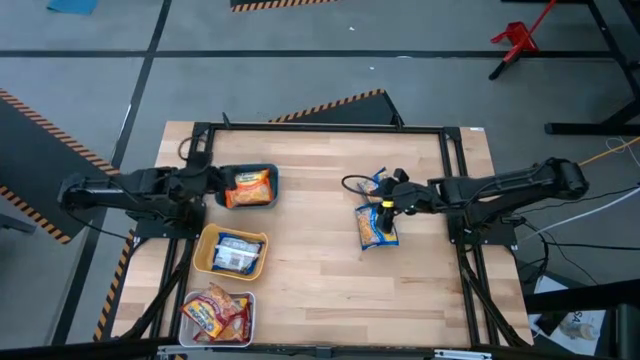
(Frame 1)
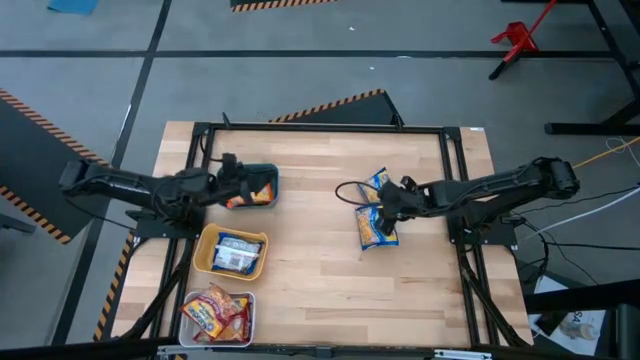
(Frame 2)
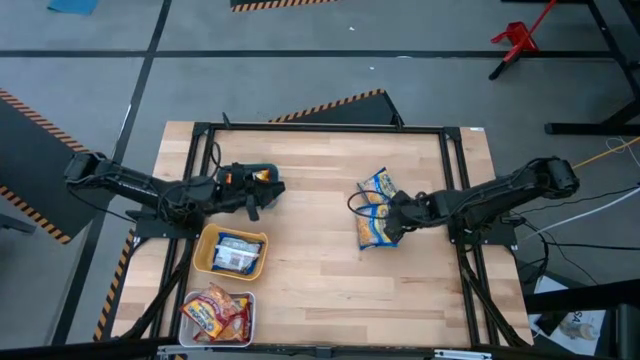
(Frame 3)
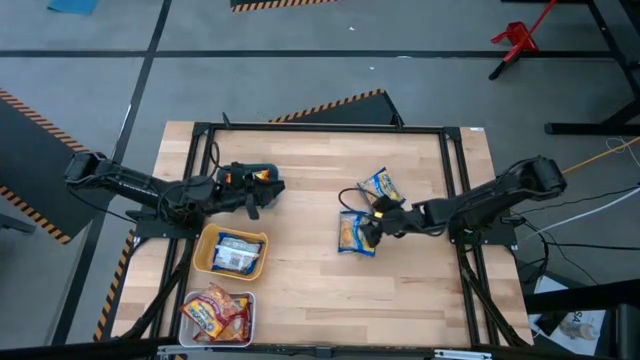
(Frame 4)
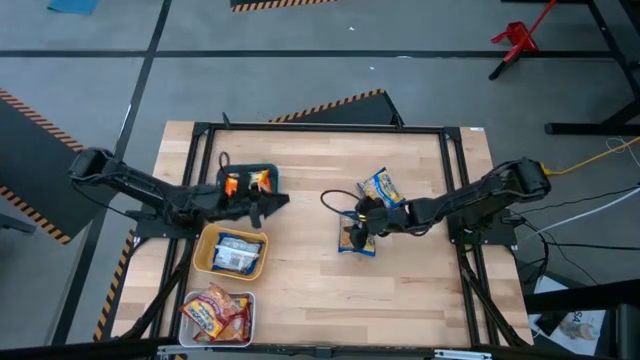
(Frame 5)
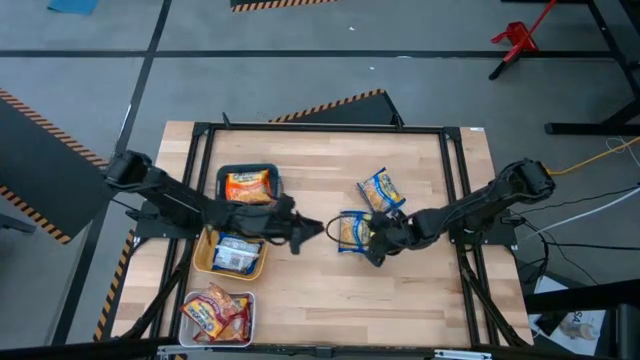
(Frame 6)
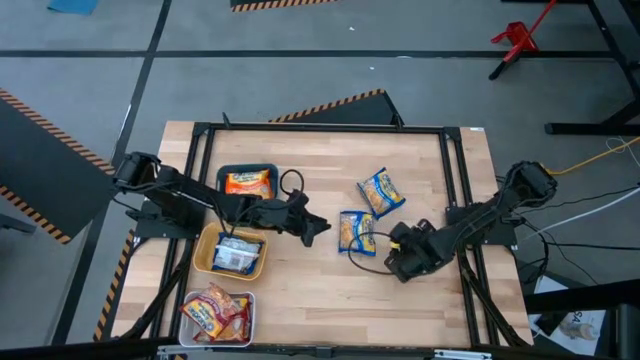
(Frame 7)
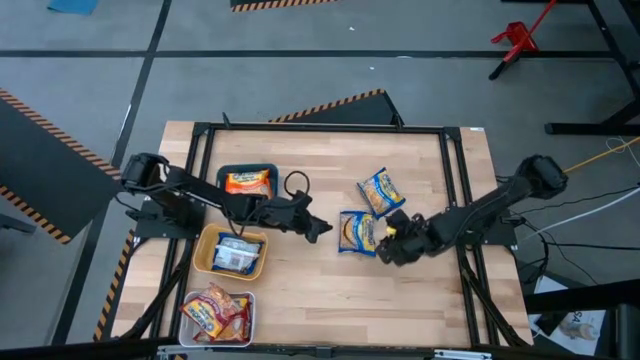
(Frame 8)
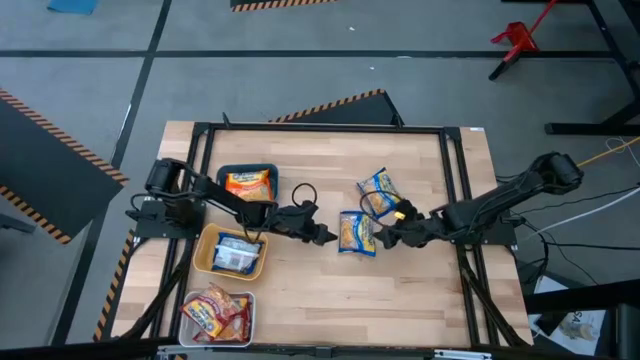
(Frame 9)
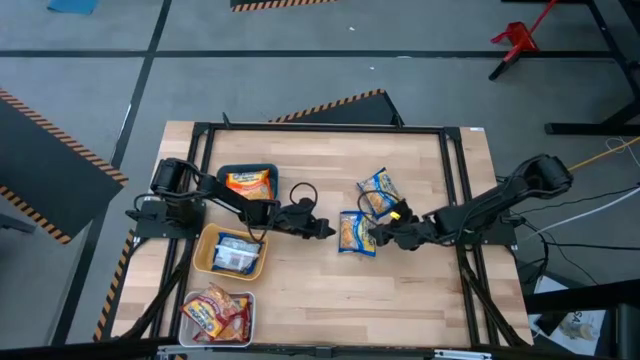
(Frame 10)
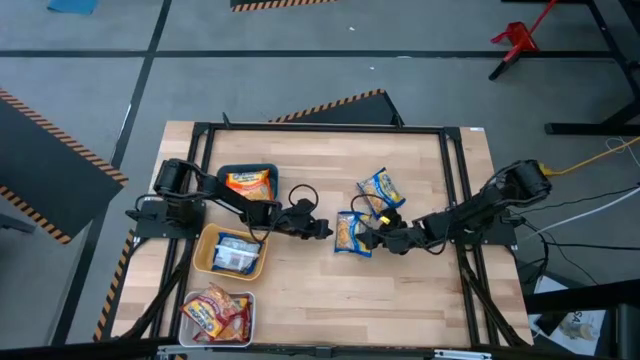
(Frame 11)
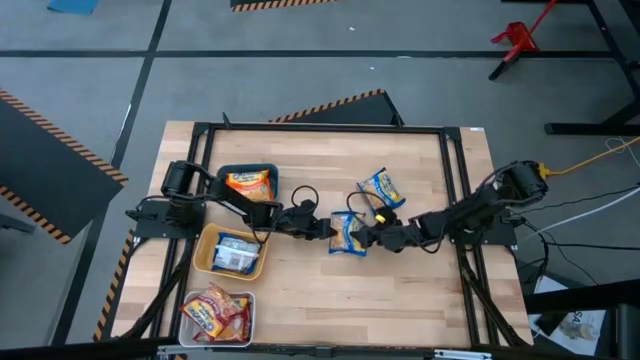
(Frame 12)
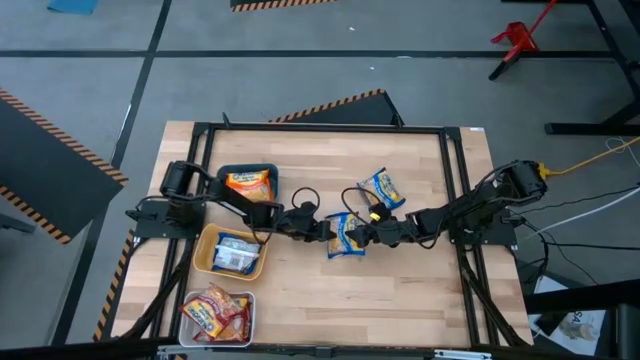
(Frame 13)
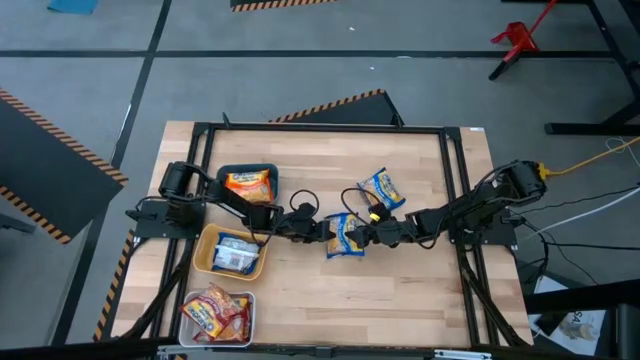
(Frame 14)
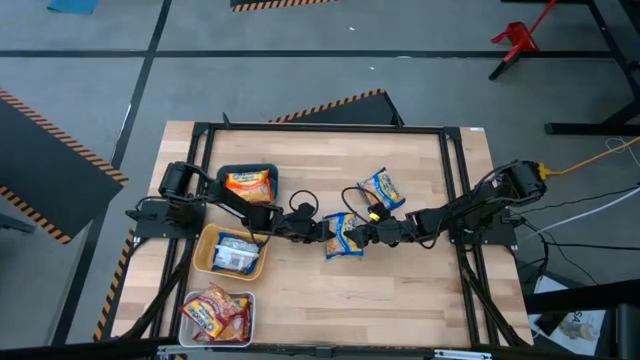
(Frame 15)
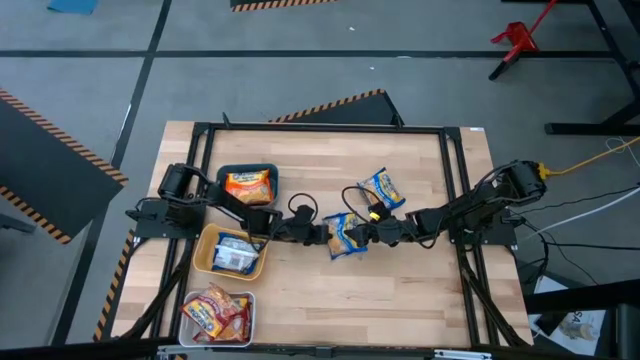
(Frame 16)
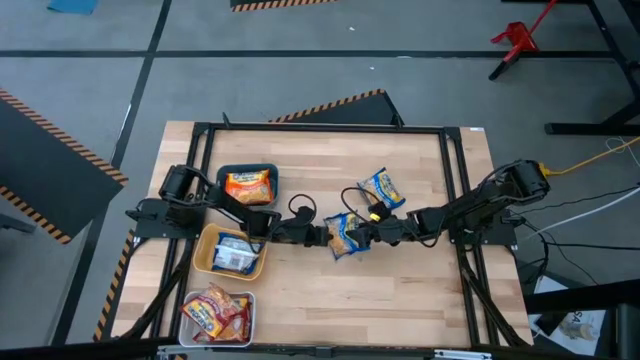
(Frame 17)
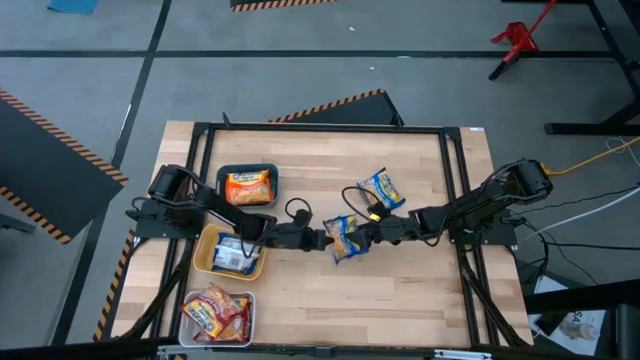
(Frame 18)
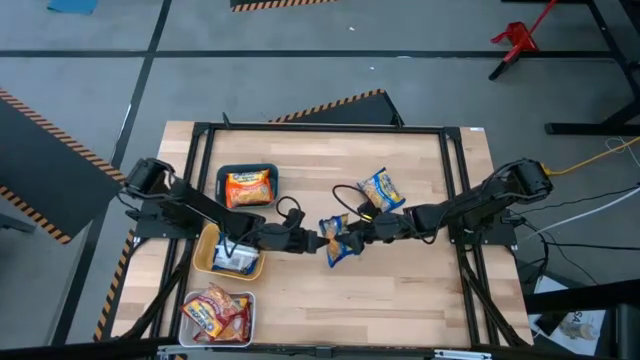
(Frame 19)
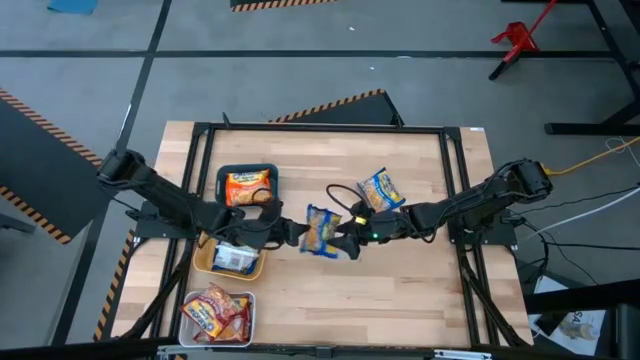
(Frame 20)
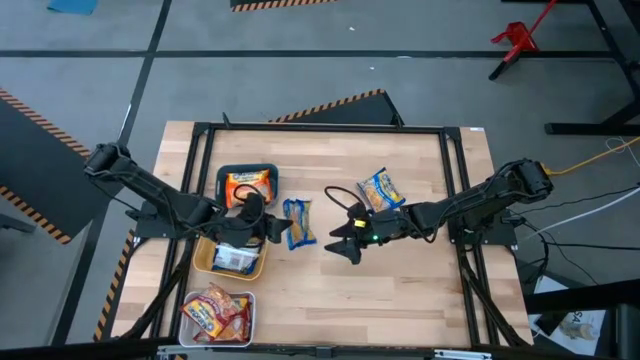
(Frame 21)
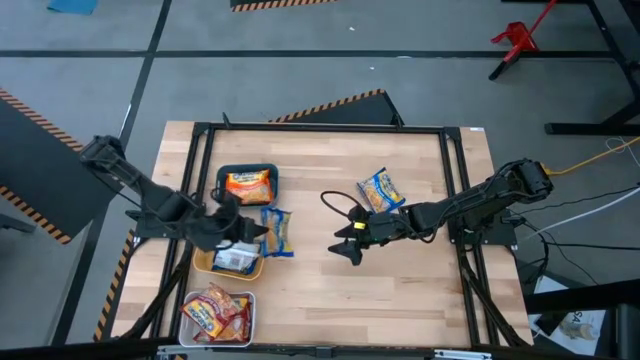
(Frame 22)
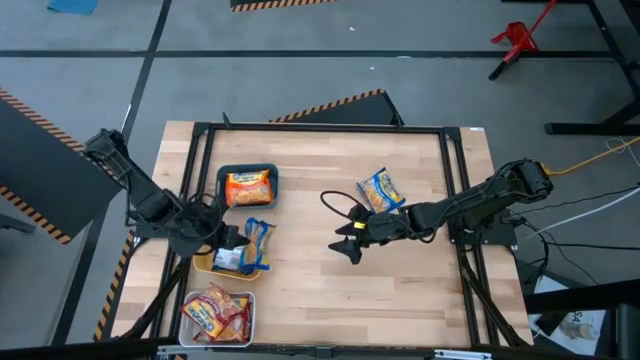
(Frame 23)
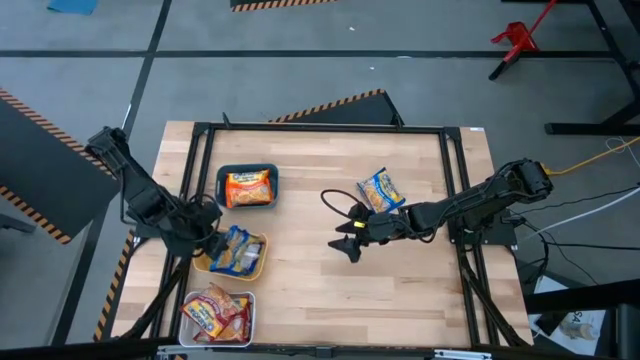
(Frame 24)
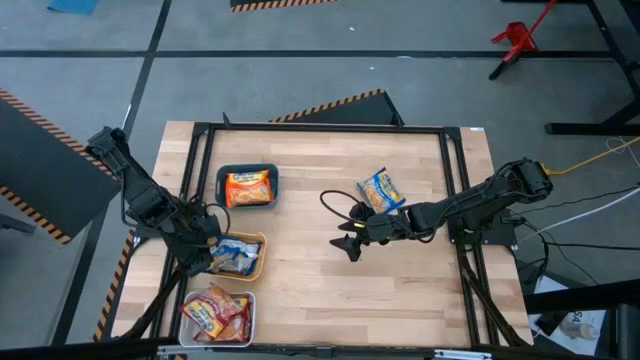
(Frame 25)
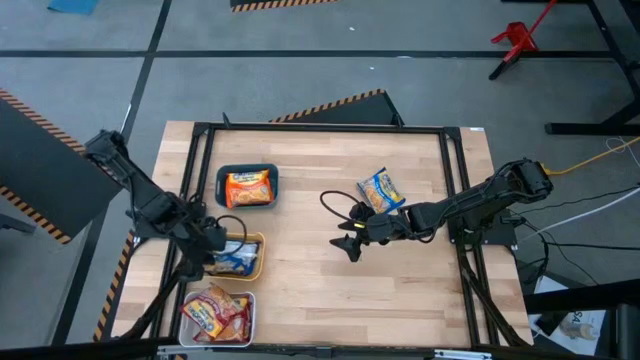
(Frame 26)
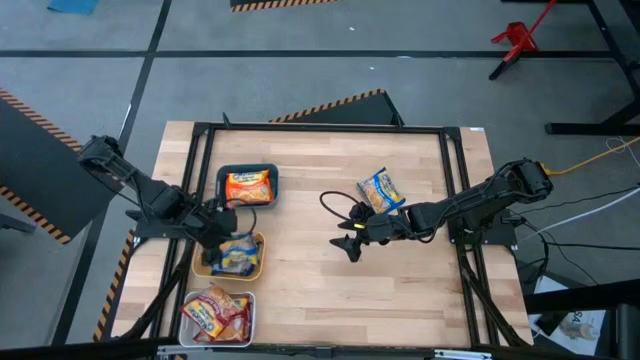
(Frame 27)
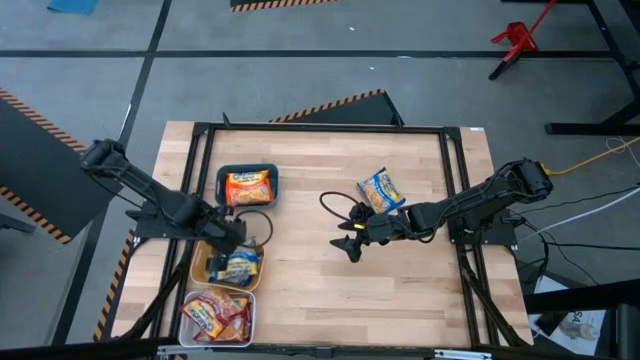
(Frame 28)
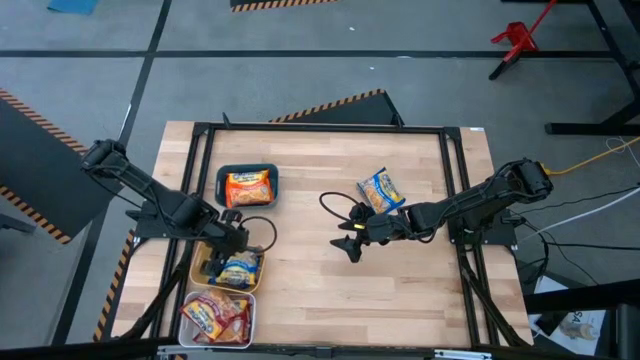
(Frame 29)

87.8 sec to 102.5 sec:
Task: Sort Maruchan noodles
Put the bottom blue noodle pack into the yellow bin

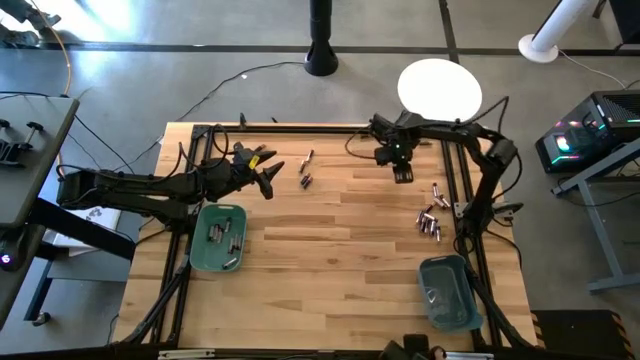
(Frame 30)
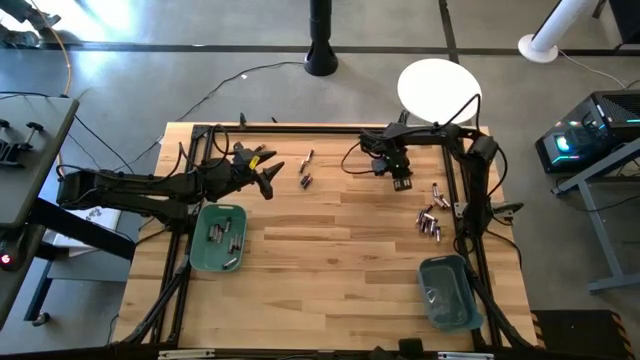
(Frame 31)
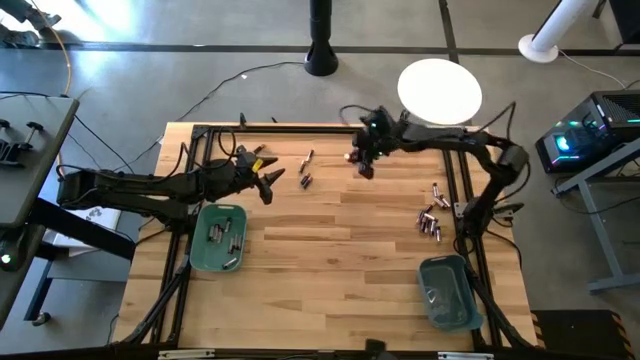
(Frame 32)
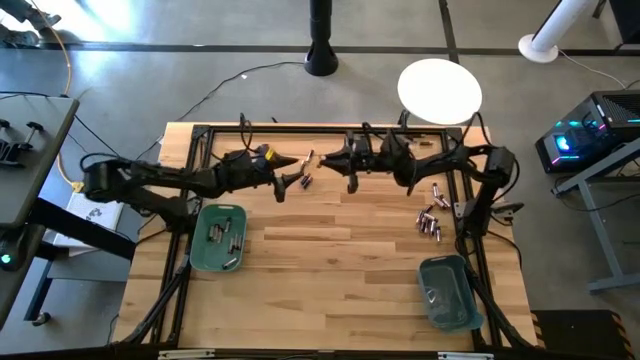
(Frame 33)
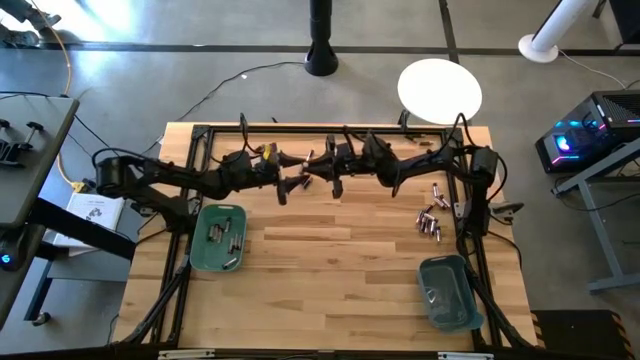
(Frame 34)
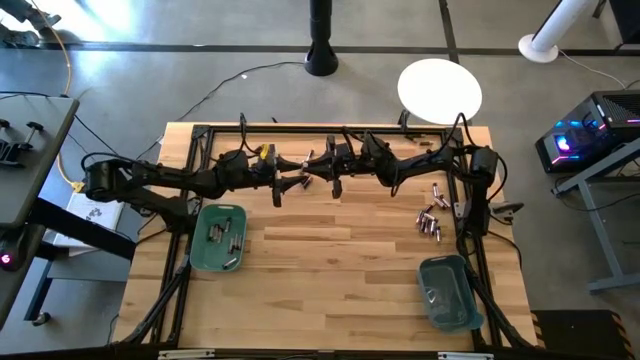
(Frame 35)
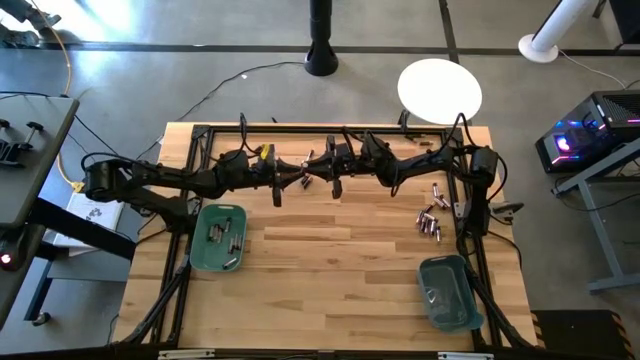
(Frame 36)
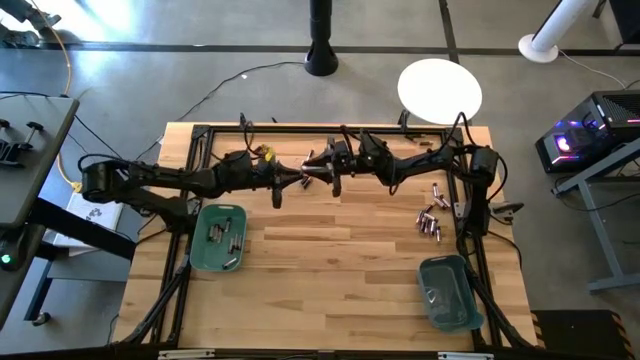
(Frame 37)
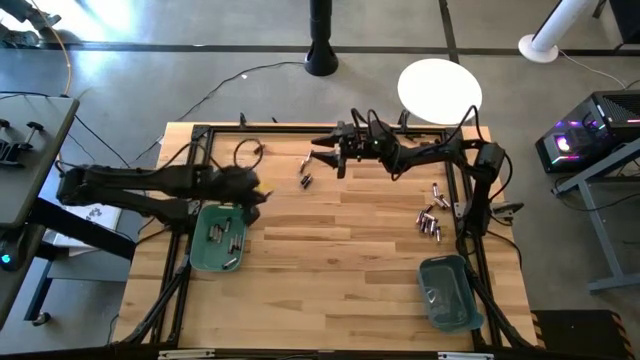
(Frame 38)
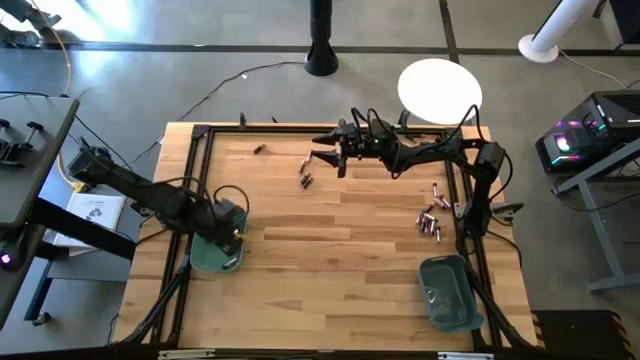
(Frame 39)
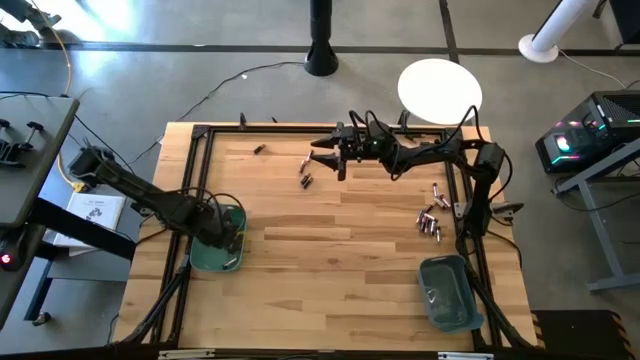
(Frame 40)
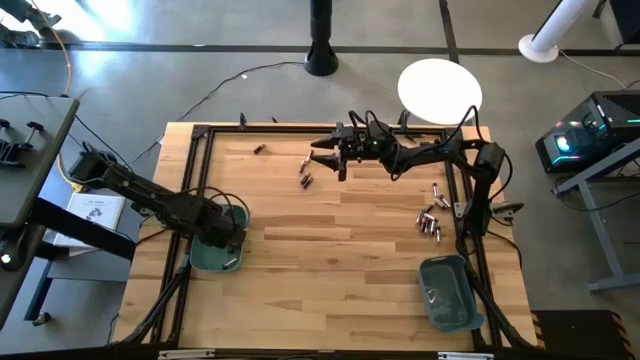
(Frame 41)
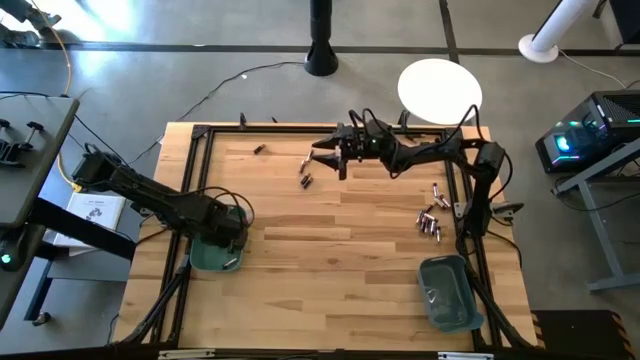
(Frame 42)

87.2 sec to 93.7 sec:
Task: Sort batteries
Put the silver battery into the green bin
